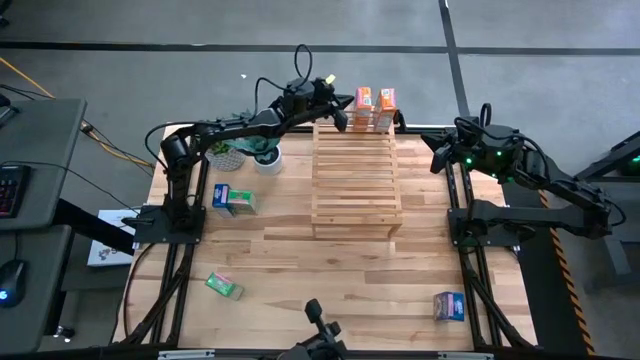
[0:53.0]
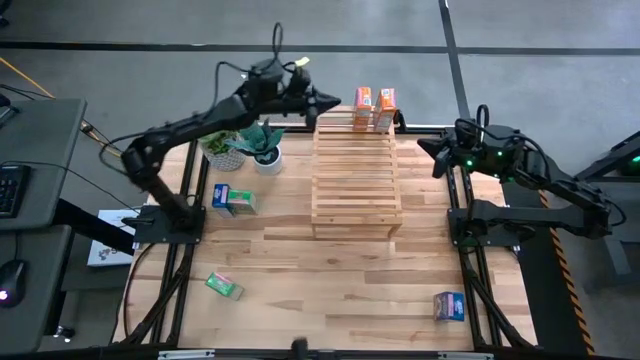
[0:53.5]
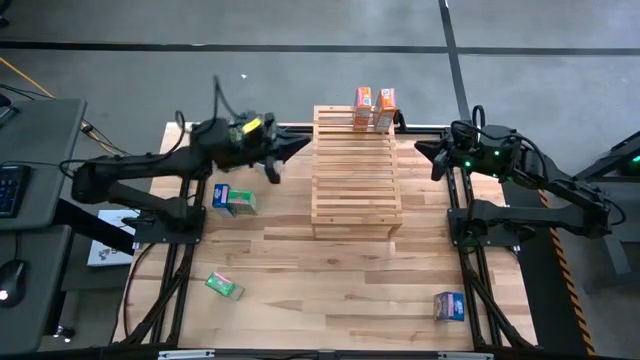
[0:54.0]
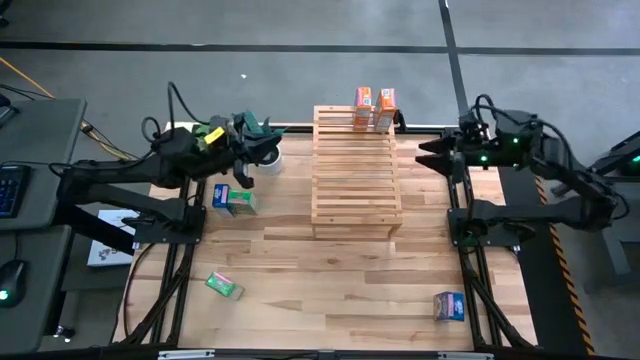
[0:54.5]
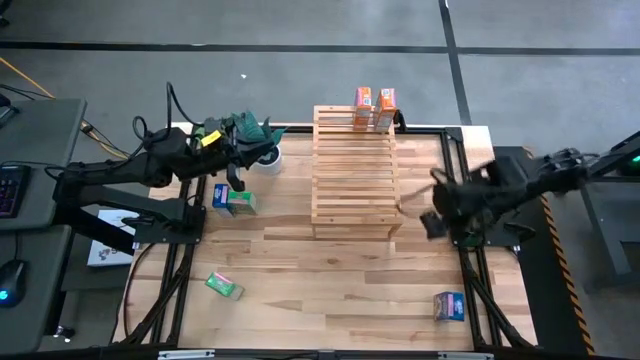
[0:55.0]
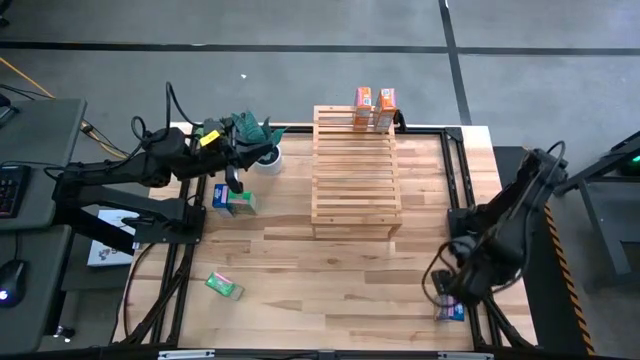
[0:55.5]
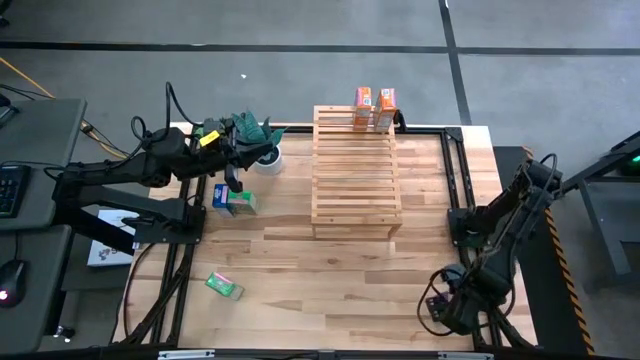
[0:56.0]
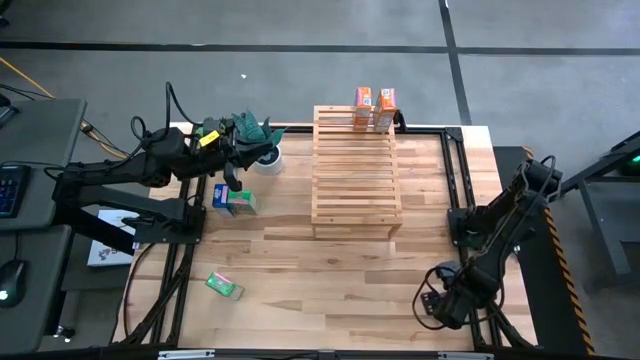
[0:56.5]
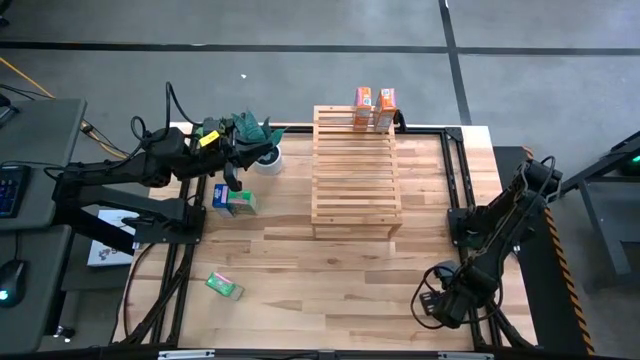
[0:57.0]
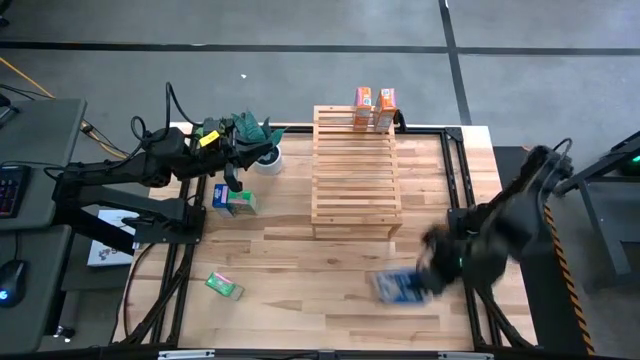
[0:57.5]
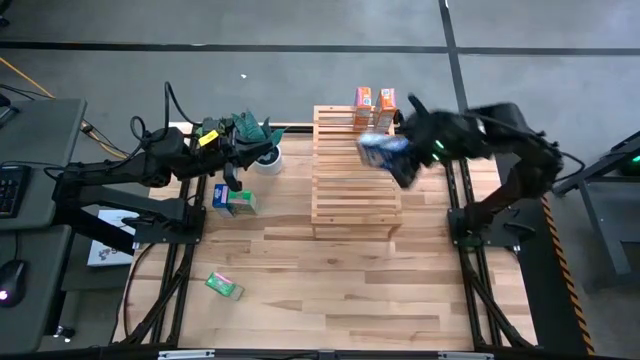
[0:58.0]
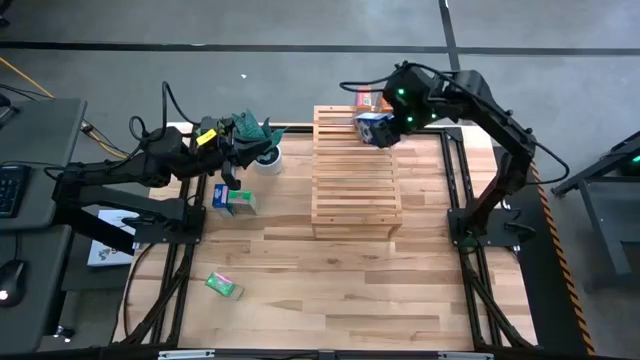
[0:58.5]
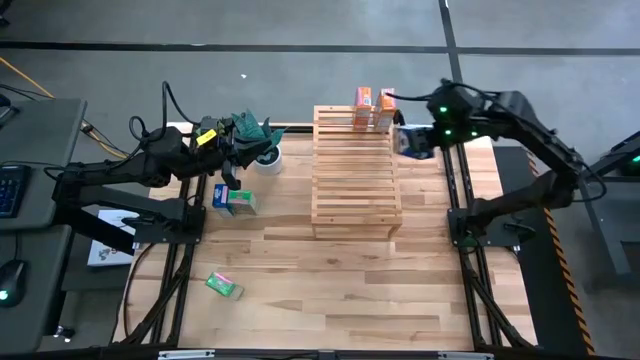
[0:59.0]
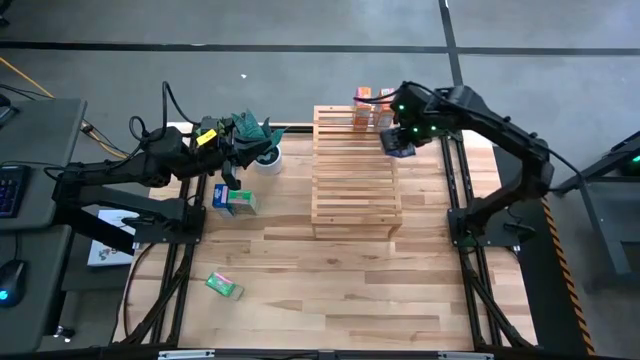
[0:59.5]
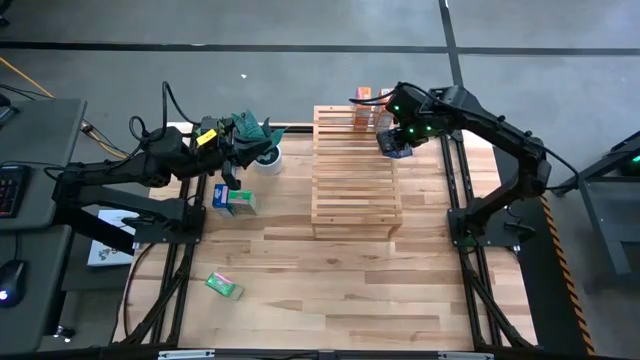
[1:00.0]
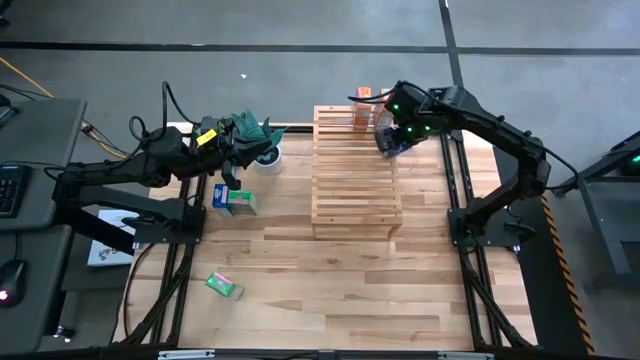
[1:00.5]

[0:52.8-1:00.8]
Task: Stack cereal on shelf
Adjust the orange cereal box on the shelf

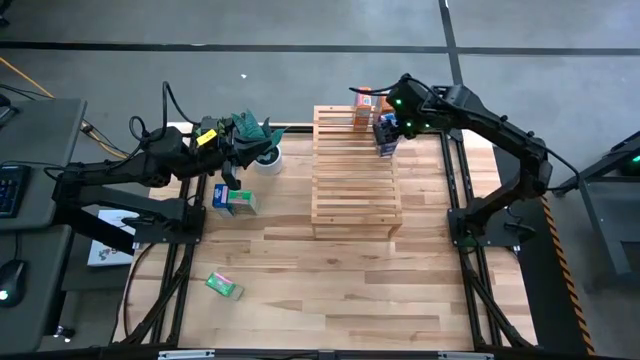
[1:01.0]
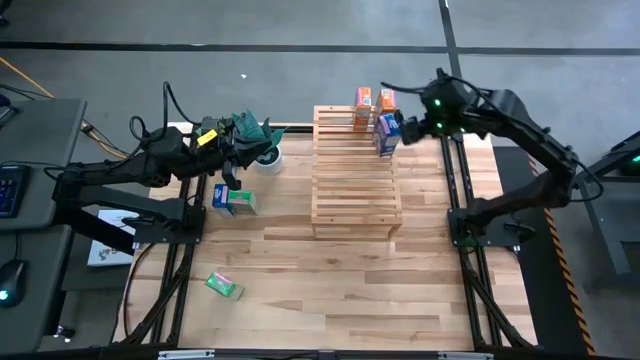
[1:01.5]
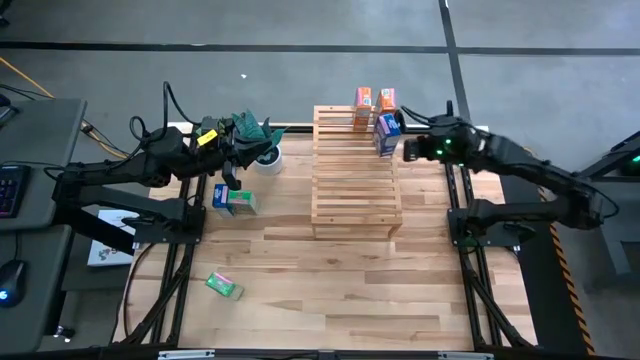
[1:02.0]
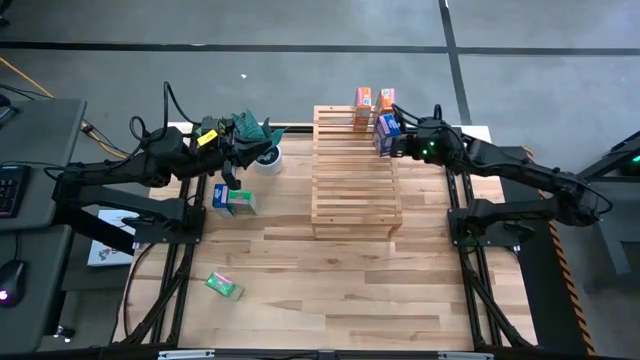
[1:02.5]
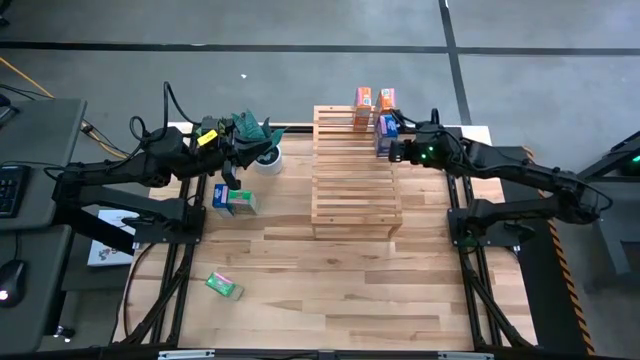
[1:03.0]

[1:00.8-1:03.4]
Put the bottom right blue cereal box on the shelf

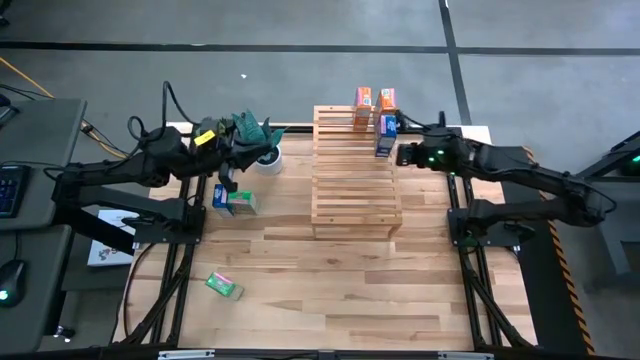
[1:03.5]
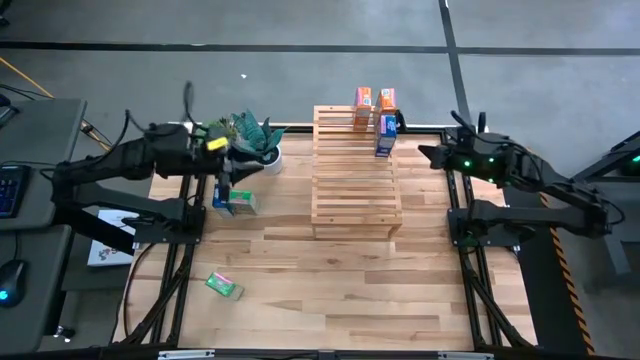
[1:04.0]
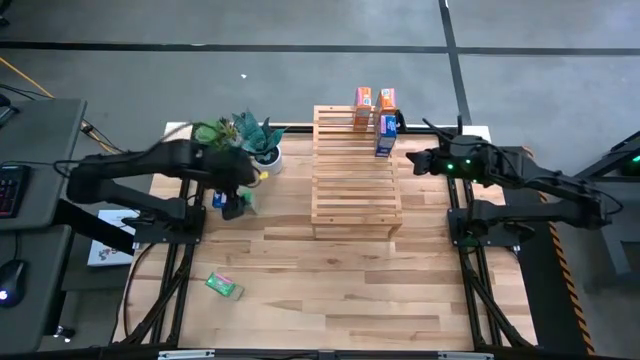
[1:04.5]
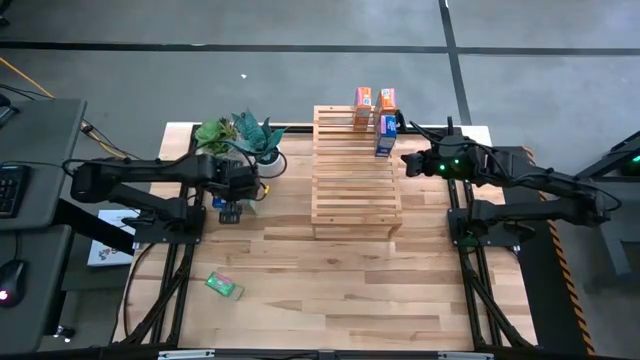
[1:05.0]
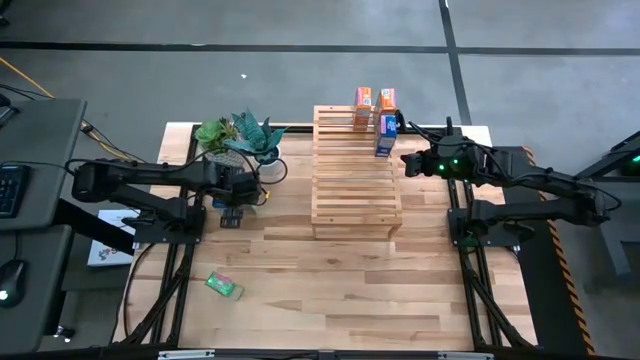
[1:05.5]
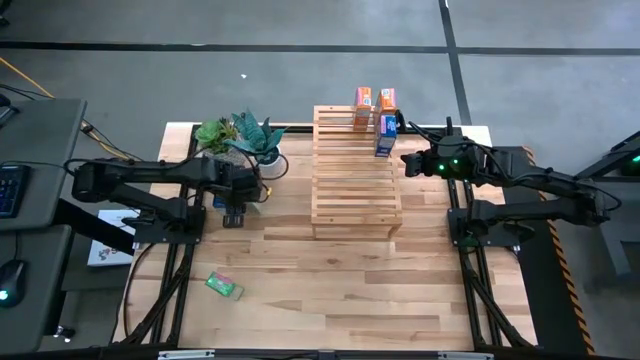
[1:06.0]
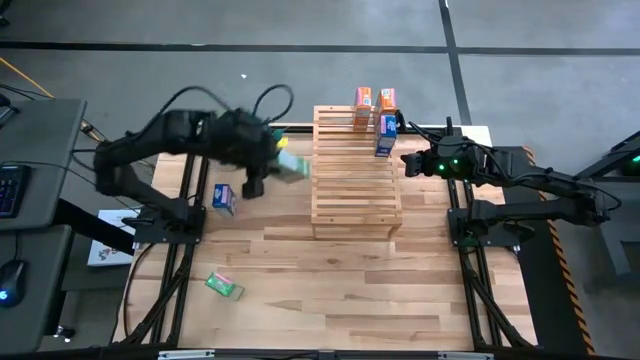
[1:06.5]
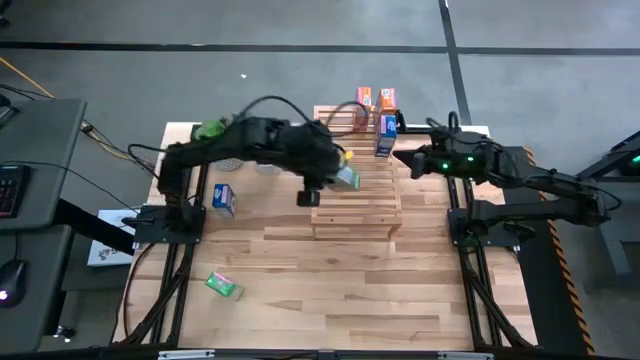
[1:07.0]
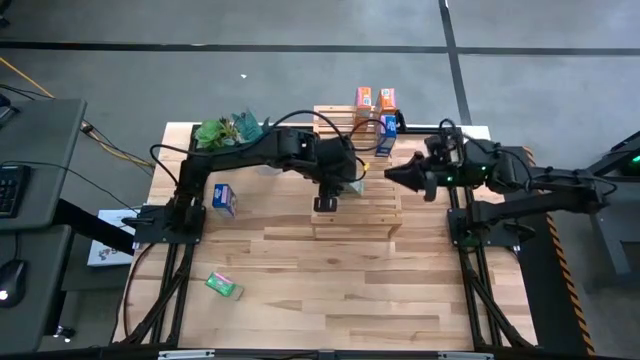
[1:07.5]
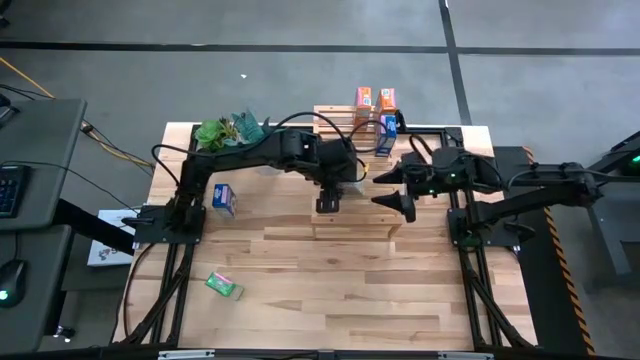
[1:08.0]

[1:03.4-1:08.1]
Put the top green cereal box on the shelf

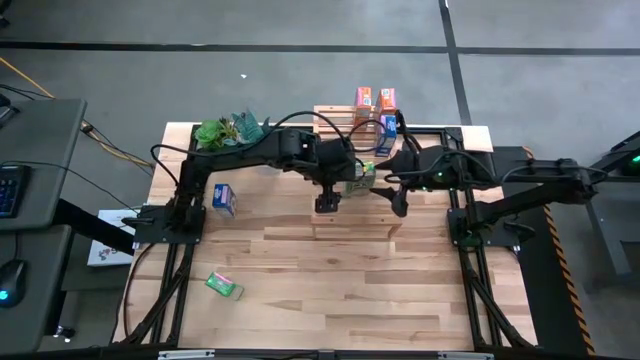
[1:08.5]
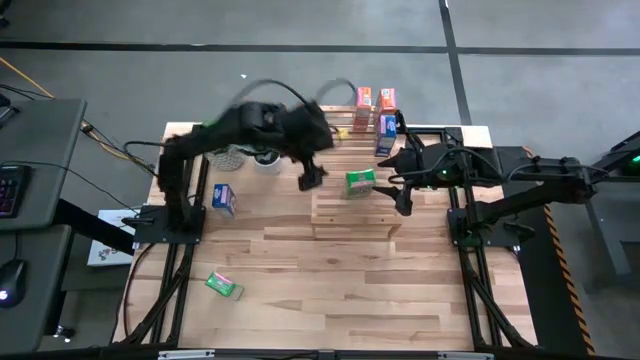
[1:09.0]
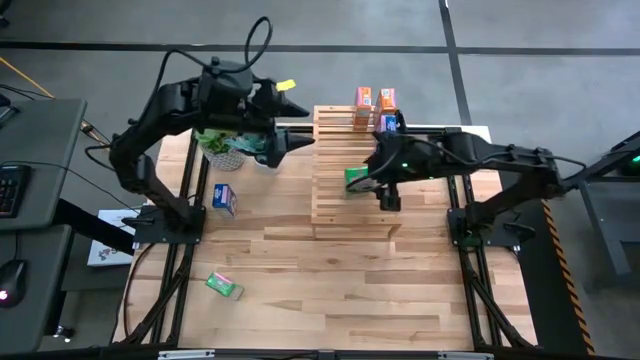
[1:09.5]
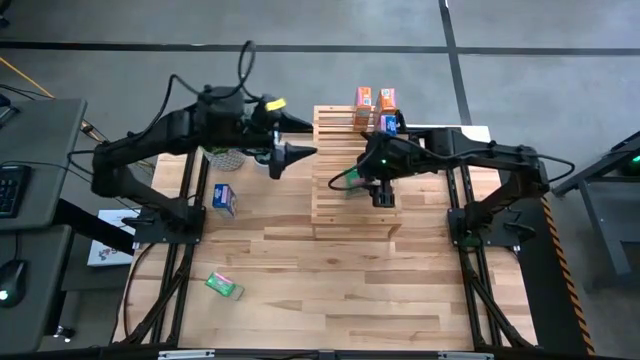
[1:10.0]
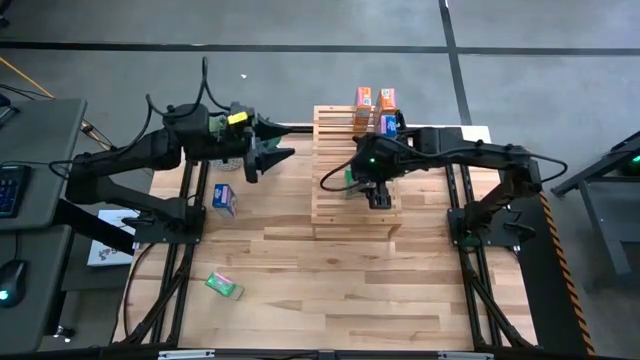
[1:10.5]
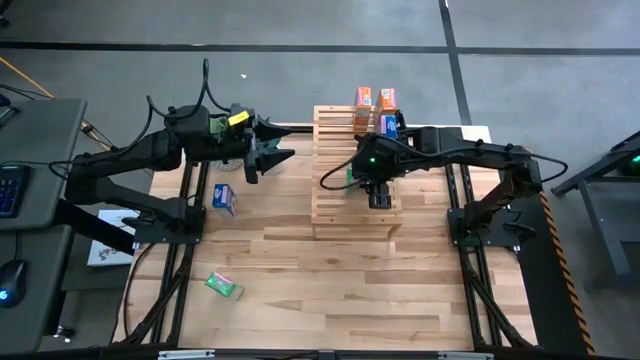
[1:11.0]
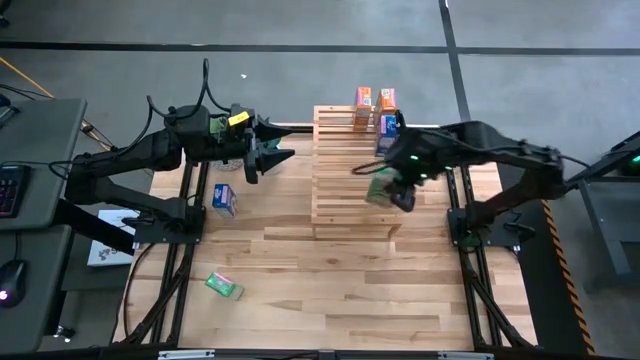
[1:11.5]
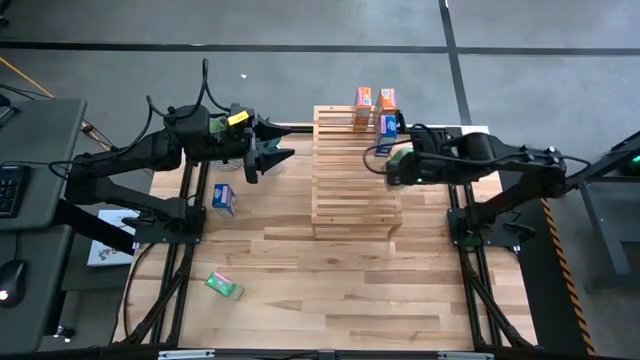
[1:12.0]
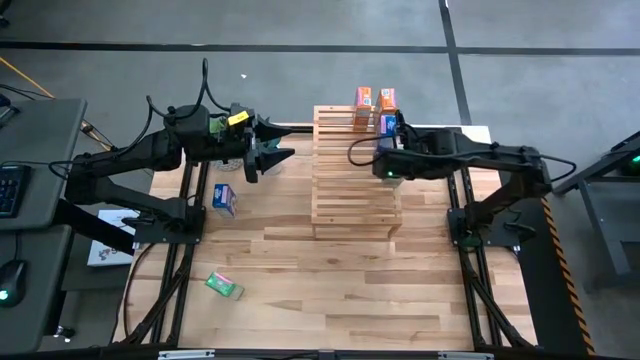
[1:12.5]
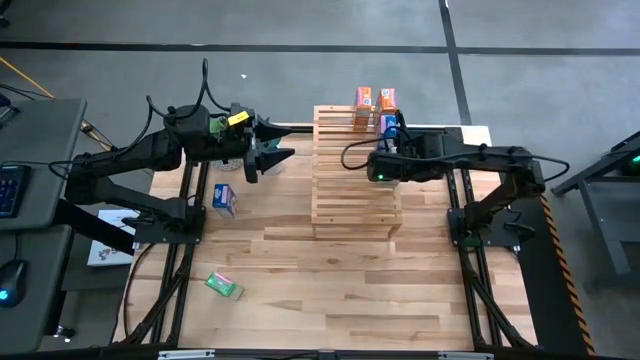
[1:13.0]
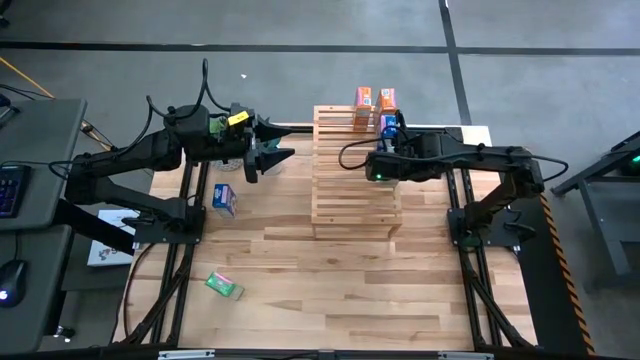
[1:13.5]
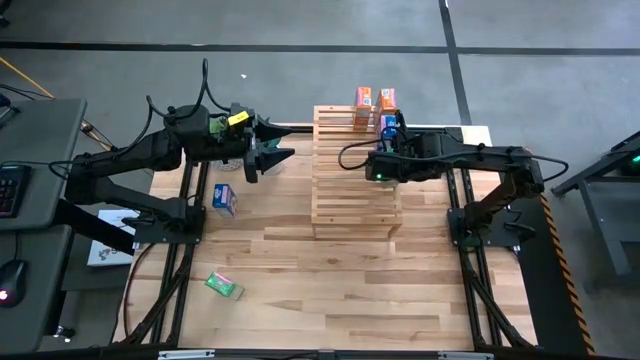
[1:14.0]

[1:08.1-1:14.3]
Put the top left green cereal box on the shelf
